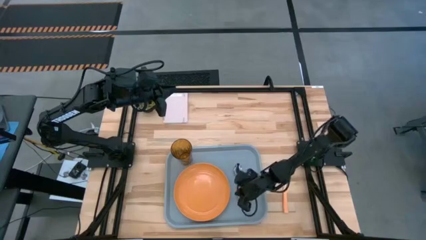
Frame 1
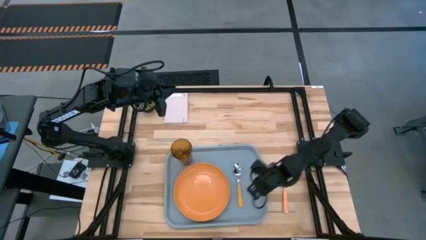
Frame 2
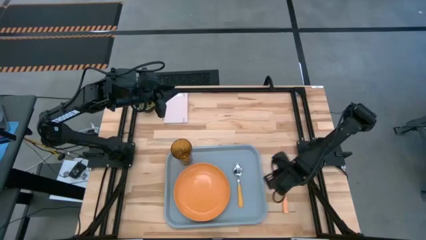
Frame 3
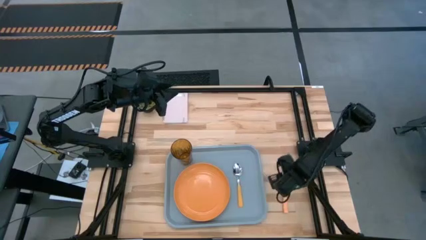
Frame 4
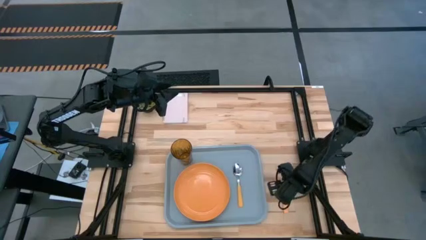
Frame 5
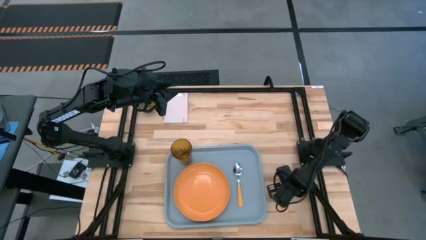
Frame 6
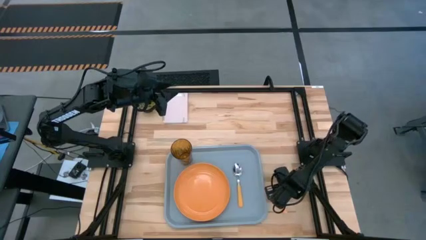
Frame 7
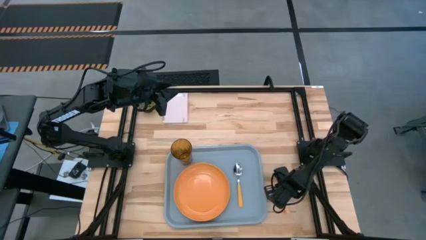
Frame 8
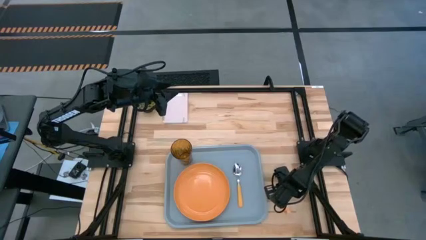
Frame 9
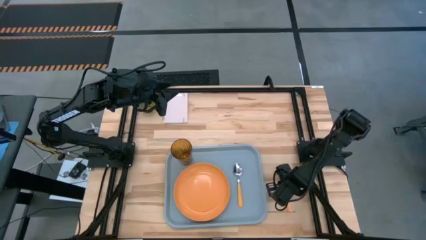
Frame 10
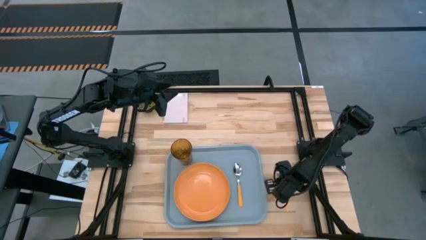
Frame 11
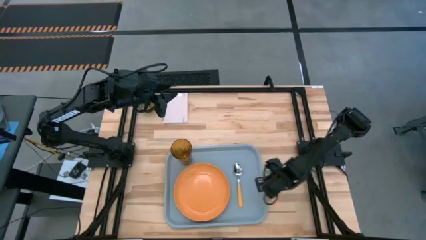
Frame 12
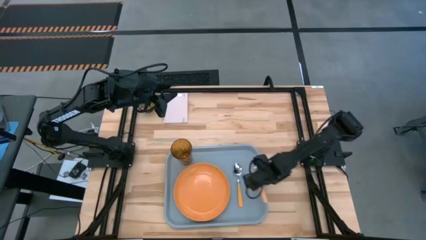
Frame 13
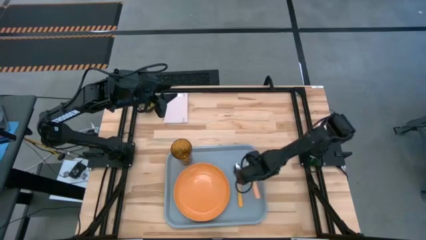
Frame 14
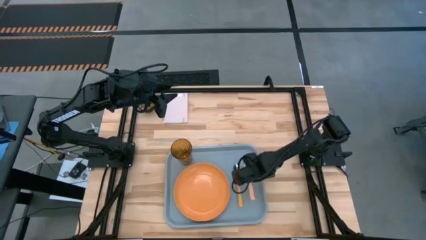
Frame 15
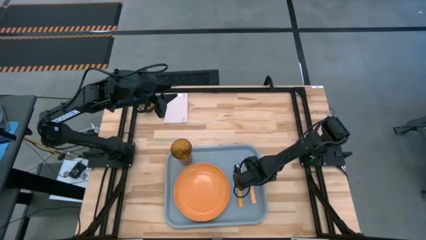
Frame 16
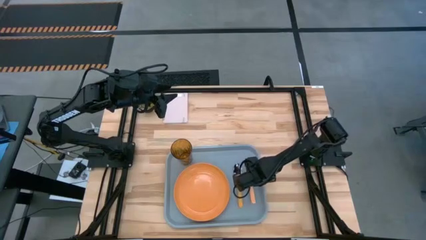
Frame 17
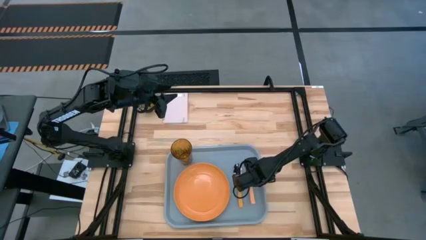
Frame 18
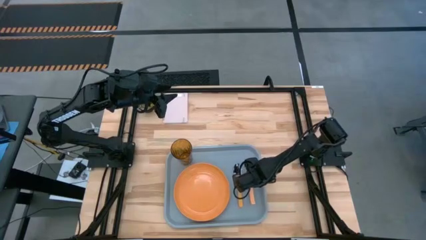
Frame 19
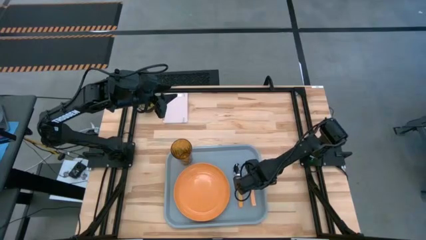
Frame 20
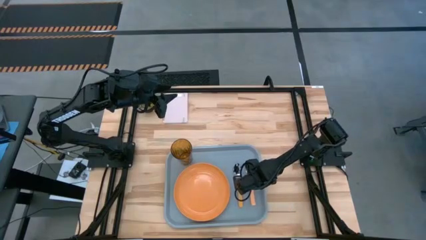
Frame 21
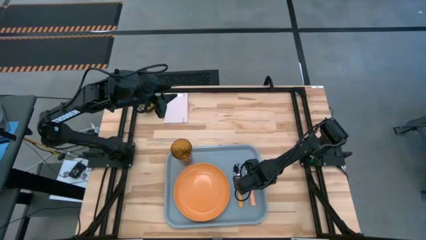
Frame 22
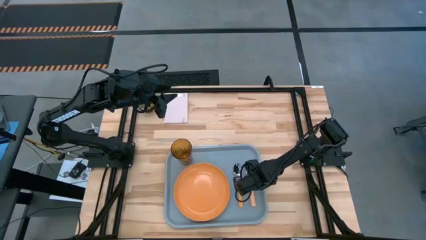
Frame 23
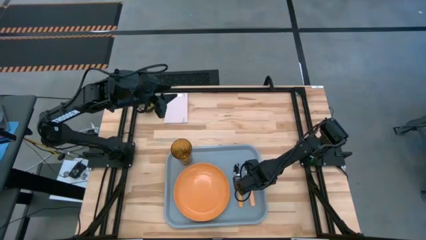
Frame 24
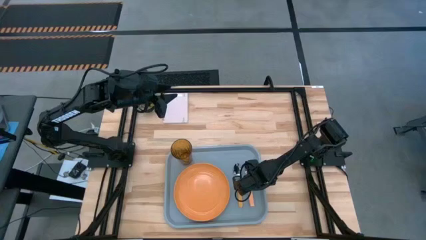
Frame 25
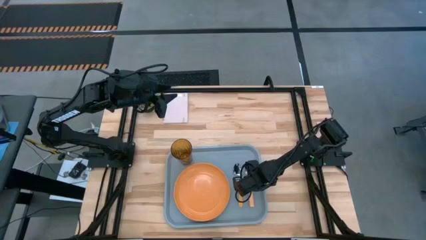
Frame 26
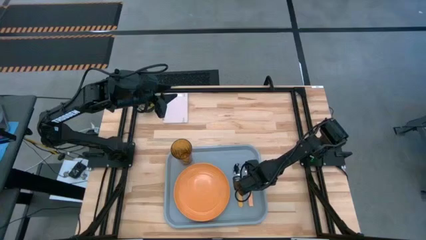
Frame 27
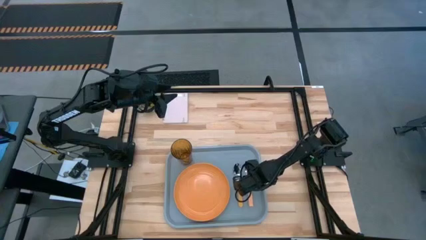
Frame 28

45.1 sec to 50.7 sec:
Task: Pick and place plate/cup/fork/spoon on tray
Put the orange fork on the gray tray to the right of the orange spoon

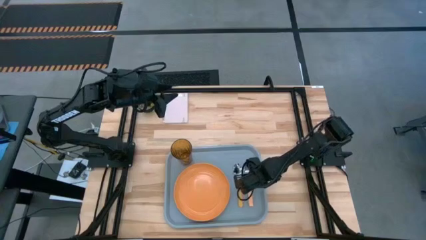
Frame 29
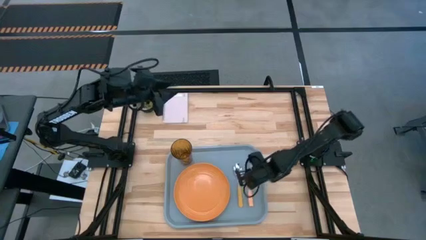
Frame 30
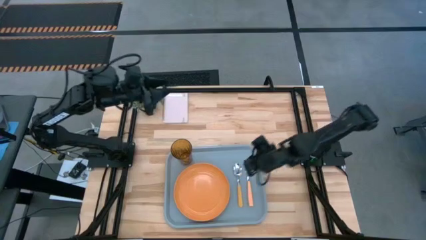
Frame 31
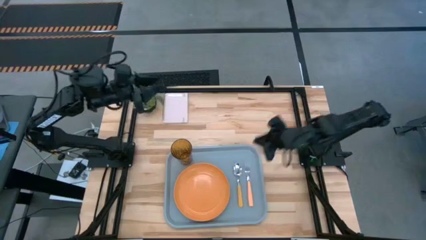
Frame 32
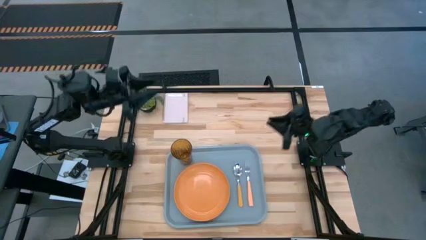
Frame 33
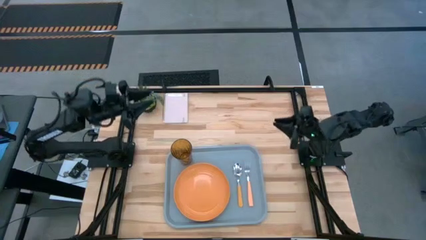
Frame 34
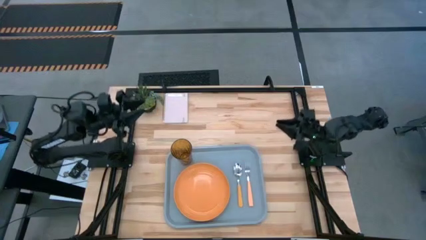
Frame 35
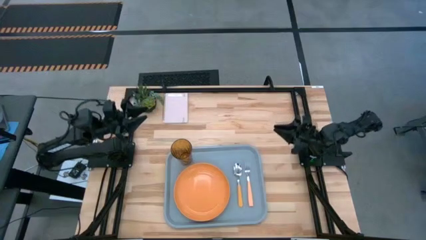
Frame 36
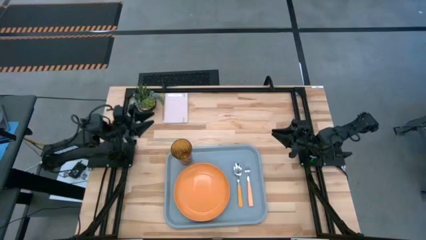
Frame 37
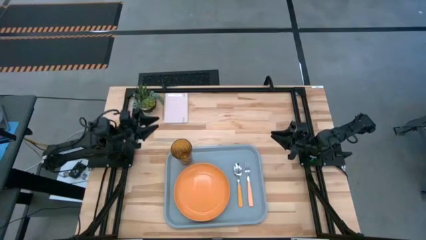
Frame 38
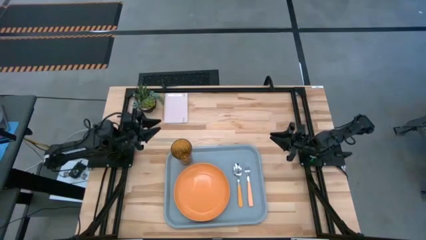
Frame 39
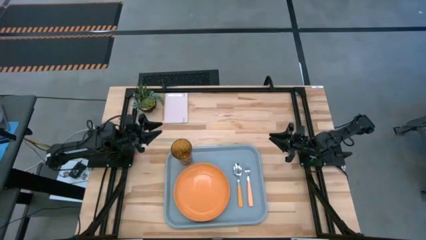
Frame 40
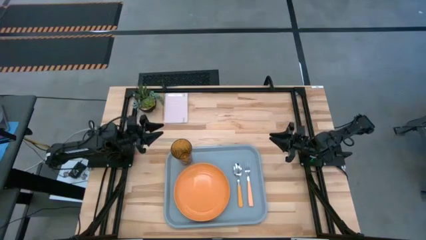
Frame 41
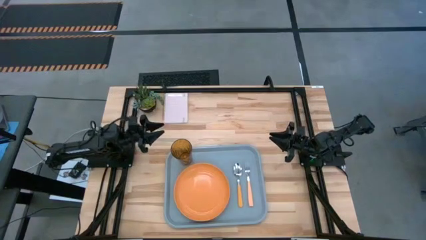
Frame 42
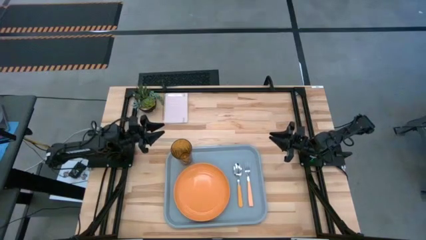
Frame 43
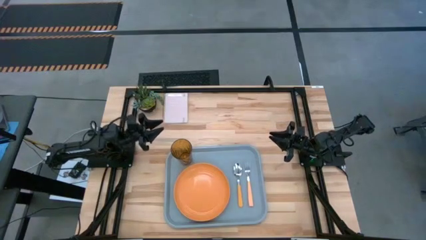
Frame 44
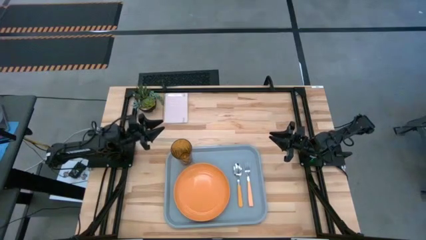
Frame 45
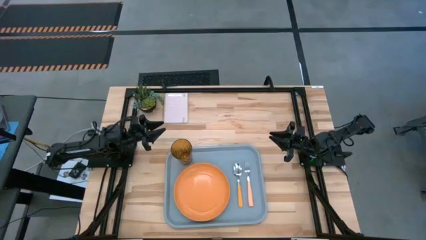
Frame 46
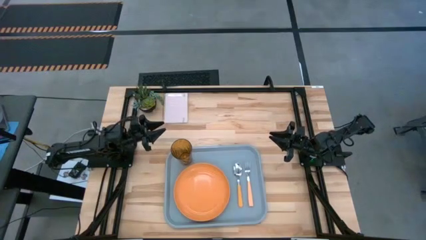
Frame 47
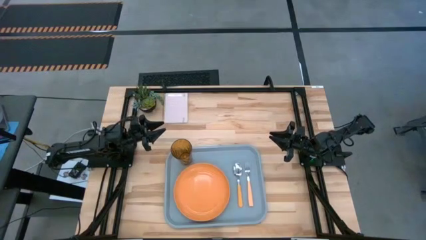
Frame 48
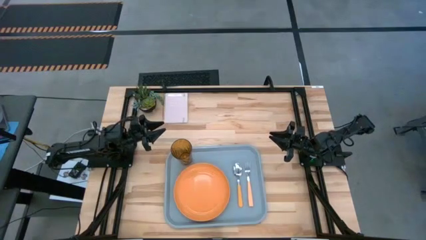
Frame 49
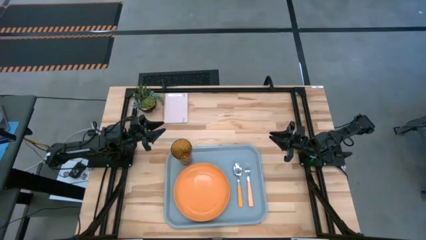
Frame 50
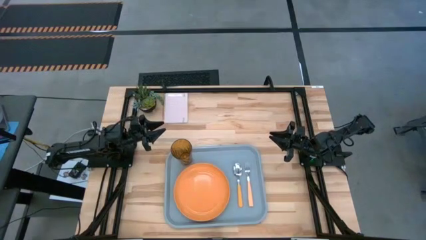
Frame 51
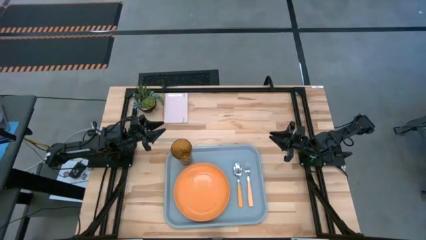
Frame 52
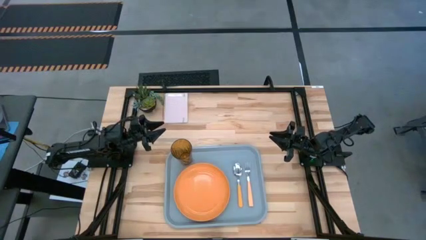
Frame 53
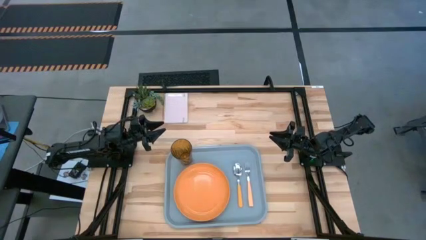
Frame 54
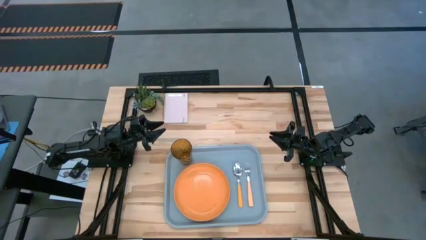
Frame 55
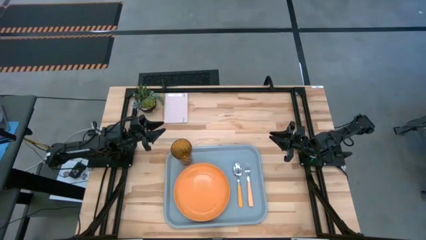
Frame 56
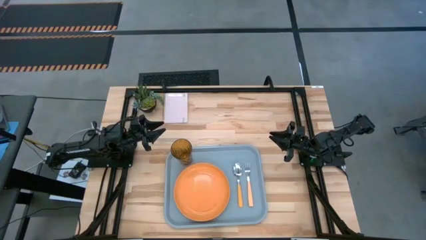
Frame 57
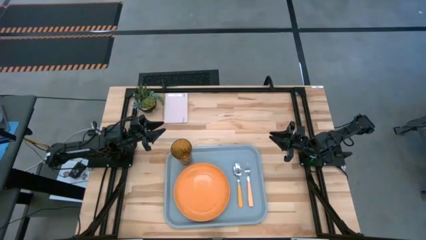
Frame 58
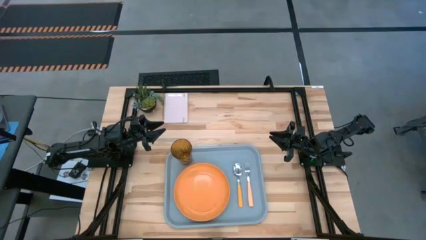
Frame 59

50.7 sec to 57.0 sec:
Return to Home Position

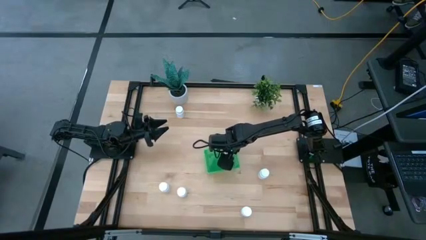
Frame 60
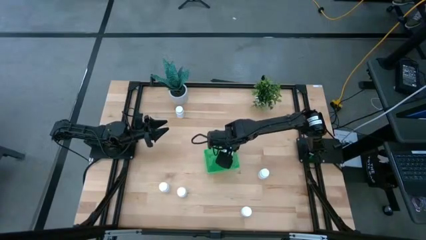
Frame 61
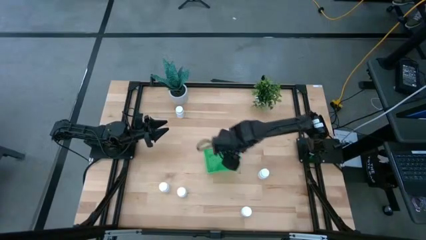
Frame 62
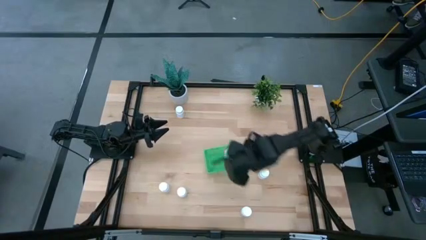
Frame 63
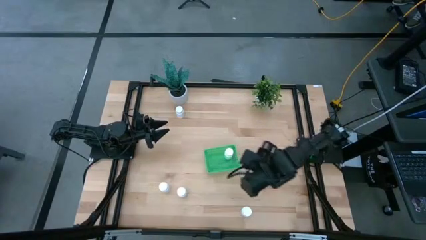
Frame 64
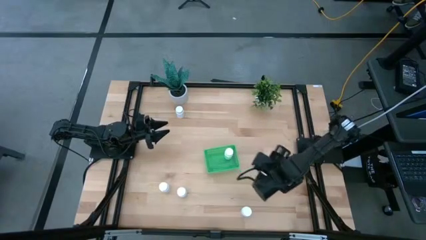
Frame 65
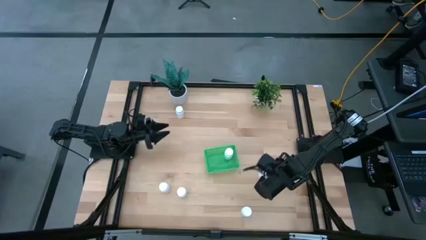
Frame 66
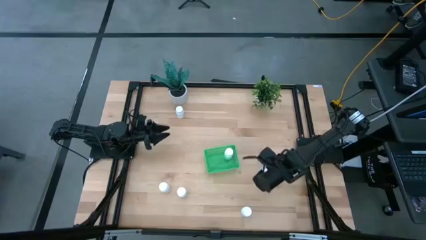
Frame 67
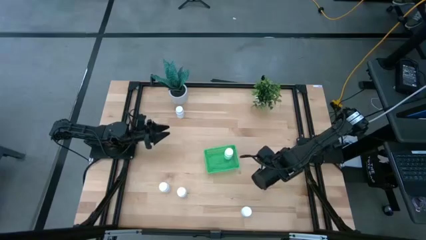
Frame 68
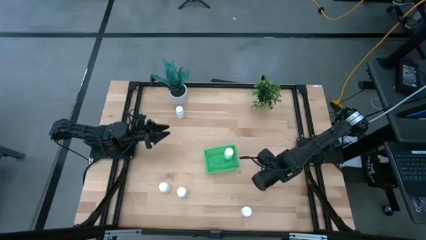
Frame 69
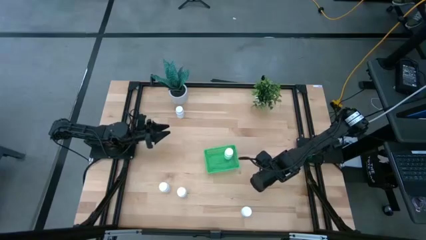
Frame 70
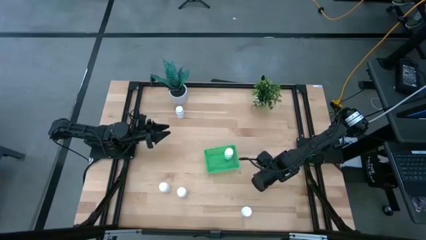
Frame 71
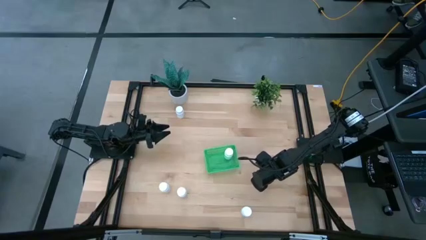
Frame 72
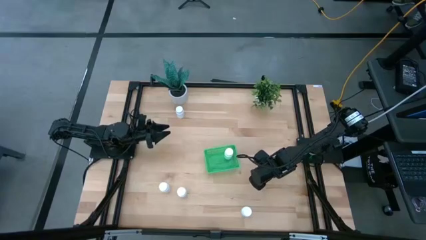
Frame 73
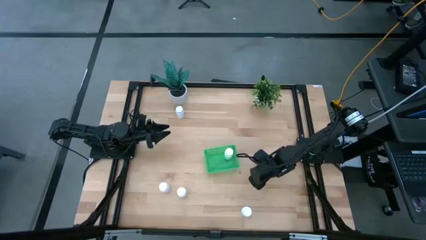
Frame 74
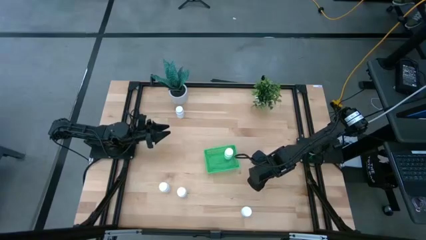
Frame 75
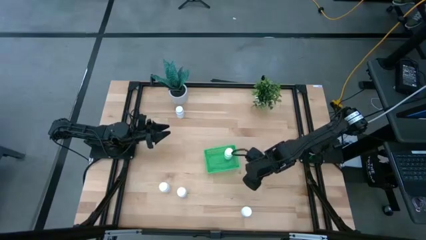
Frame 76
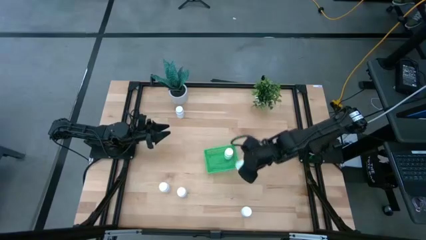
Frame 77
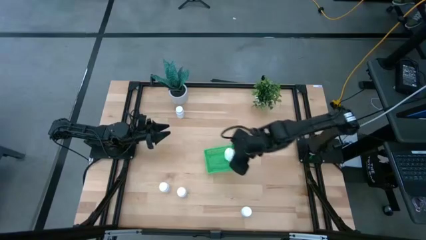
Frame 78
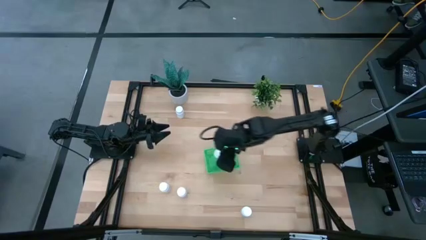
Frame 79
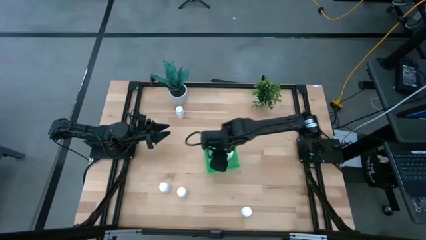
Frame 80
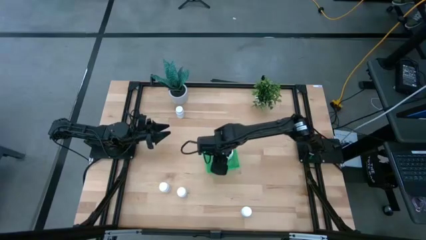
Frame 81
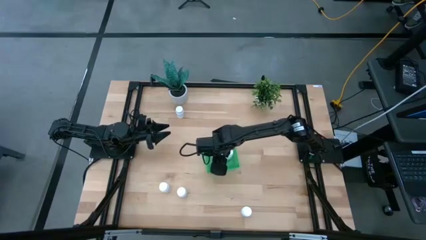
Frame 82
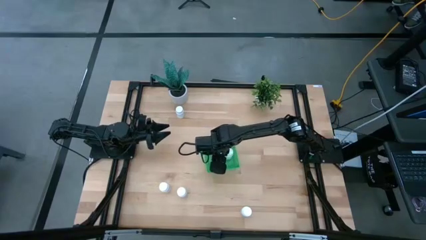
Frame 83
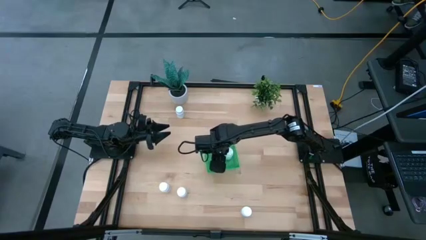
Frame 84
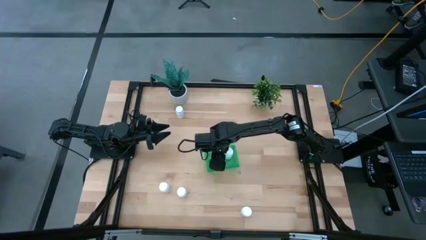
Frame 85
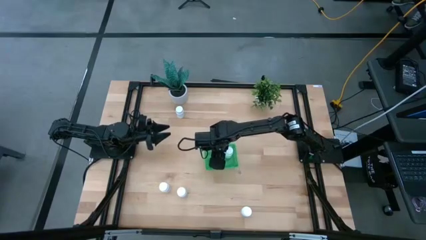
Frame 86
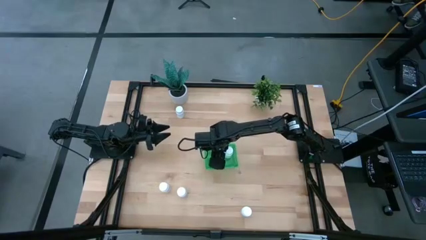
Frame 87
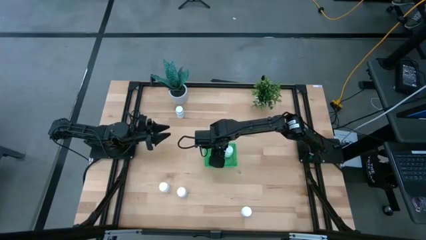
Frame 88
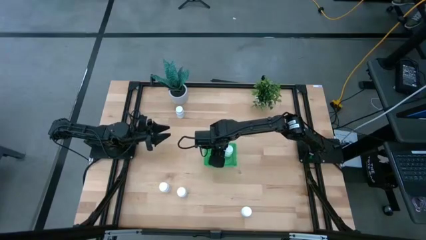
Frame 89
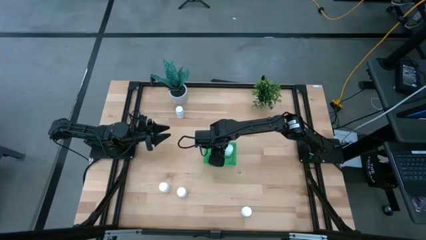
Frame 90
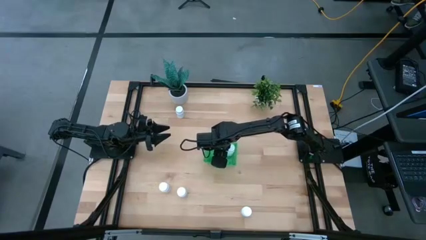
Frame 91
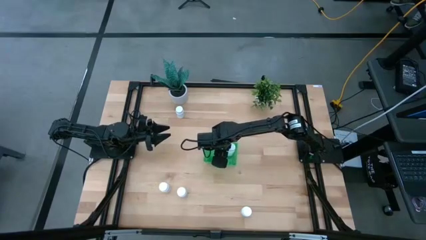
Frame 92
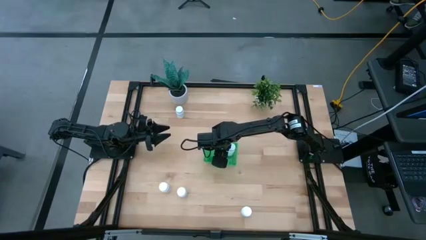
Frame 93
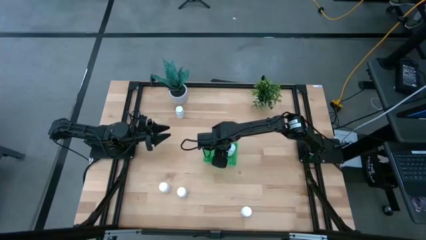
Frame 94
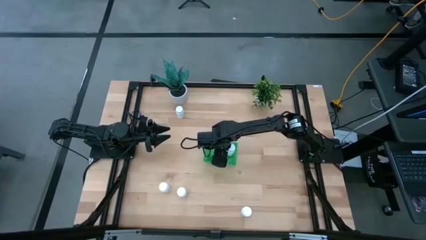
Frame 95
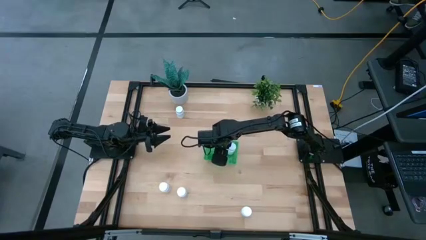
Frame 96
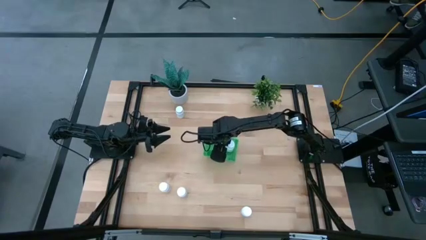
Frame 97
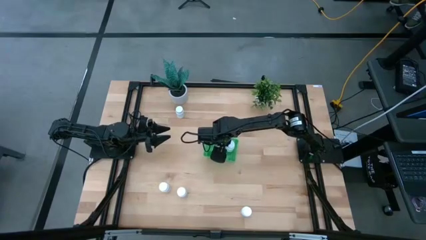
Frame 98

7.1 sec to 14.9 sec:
Task: Pick and place pill bottles into a basket
Put the white pill bottle into the green basket
